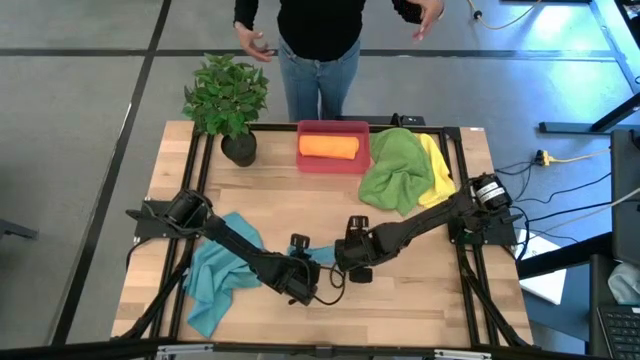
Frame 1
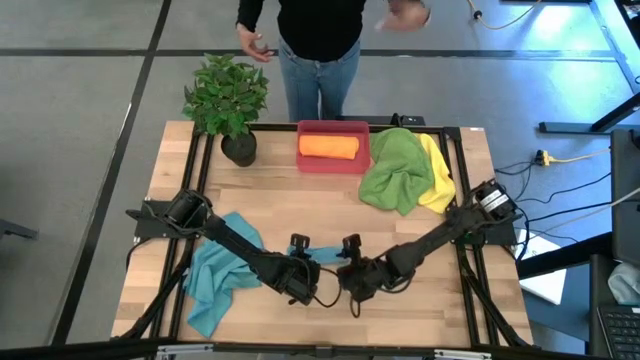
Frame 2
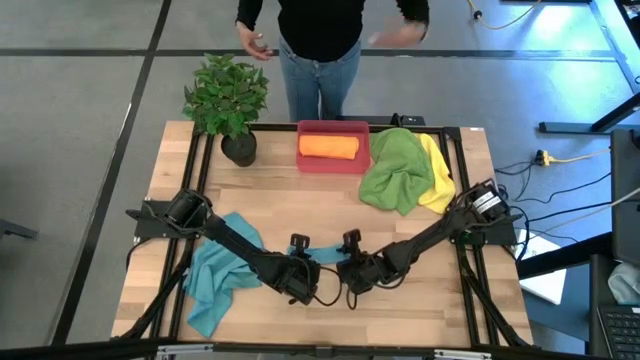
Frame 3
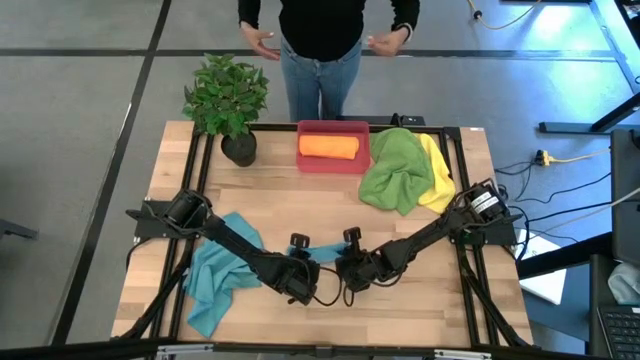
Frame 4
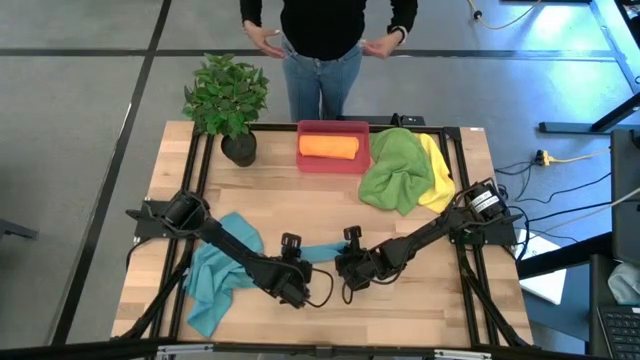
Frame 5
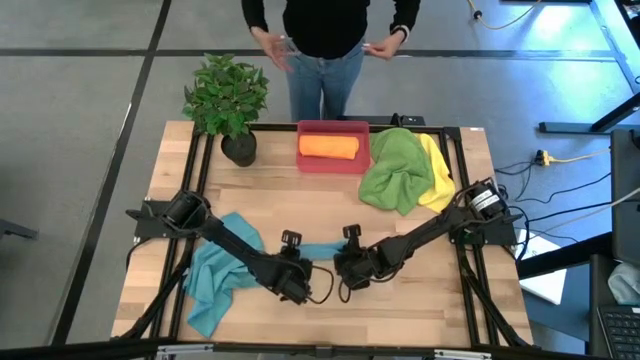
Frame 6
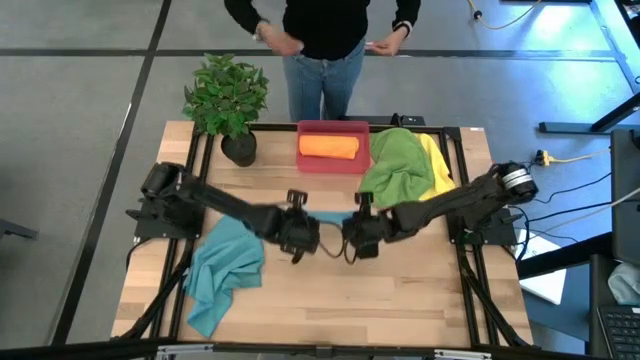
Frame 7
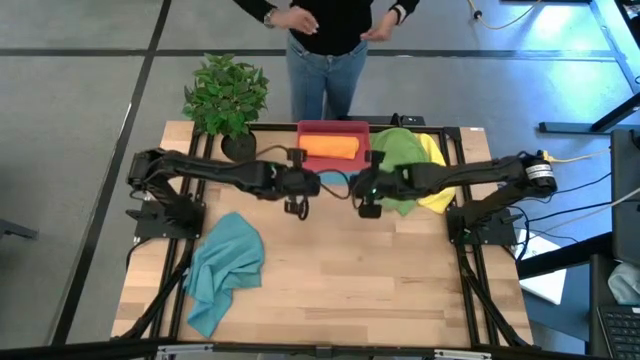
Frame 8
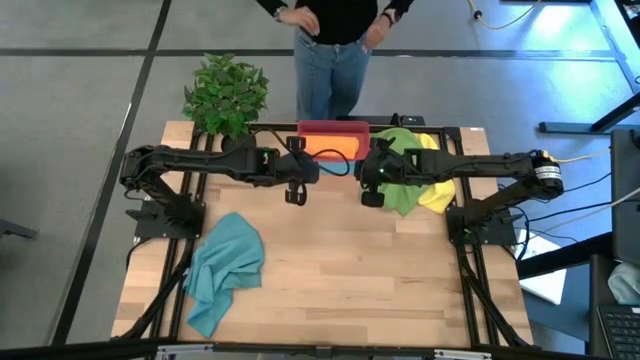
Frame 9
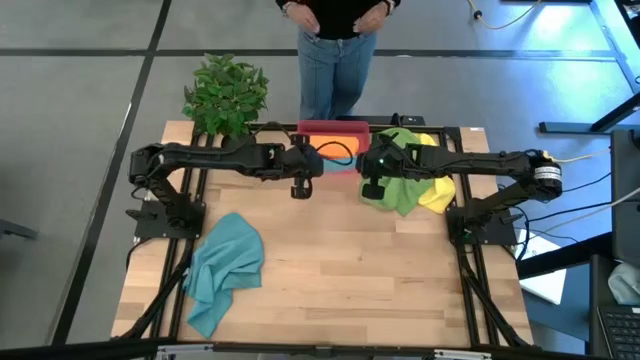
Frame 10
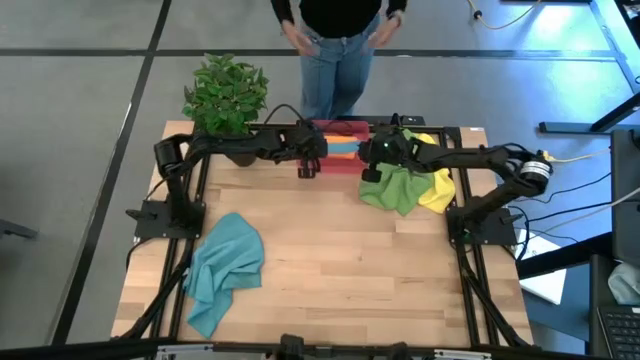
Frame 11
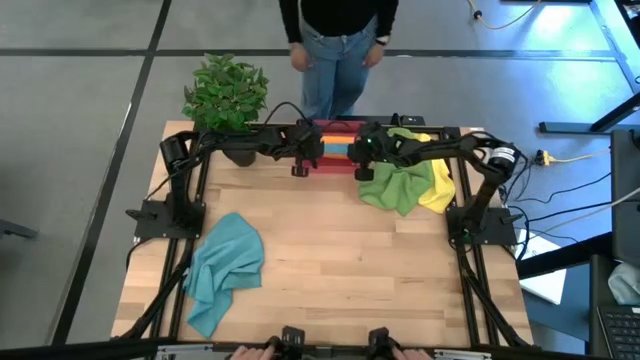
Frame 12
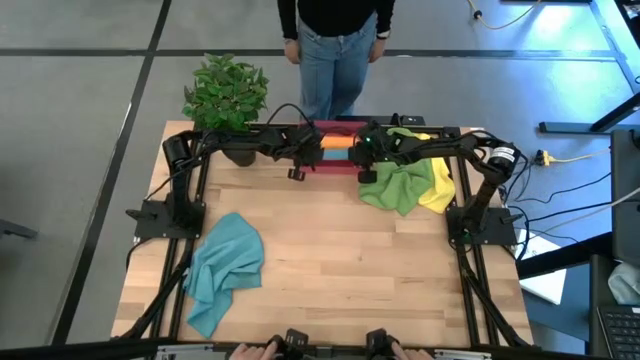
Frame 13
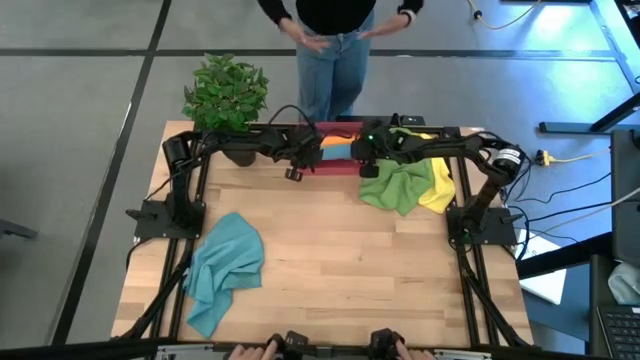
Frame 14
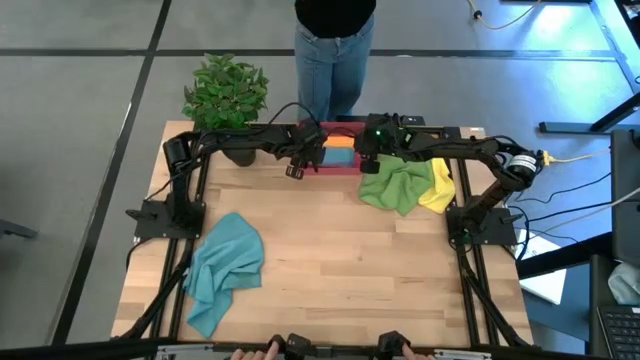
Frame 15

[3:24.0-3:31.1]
Task: Roll microfiber towels into tight, uniform cylinder then place into a basket
Put the right rolled blue towel into the red bin

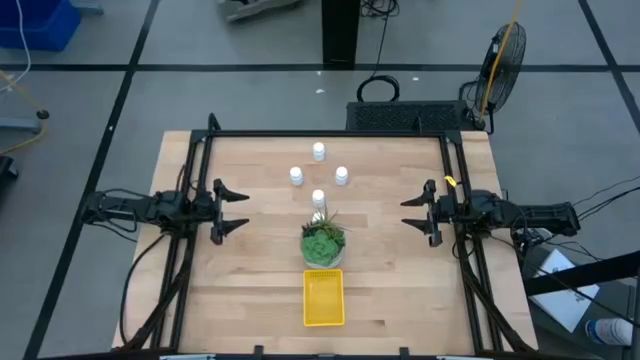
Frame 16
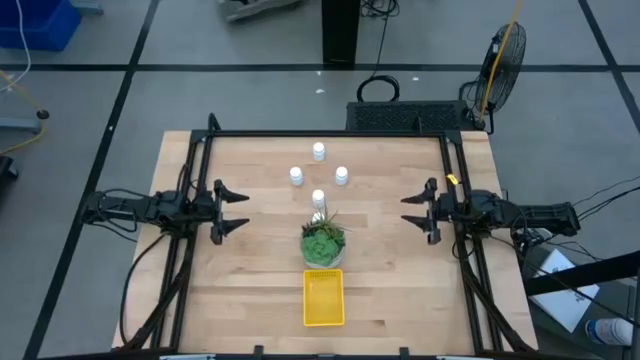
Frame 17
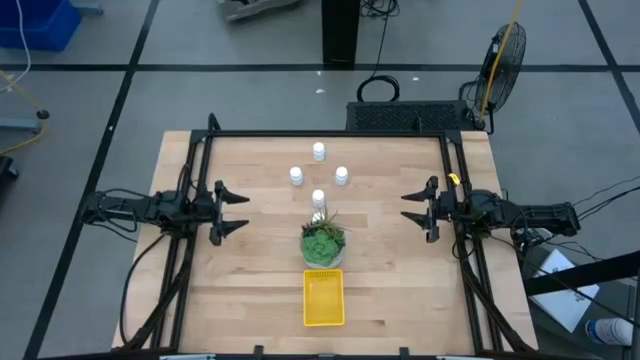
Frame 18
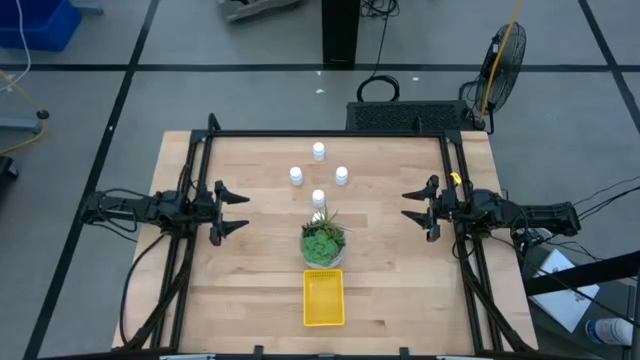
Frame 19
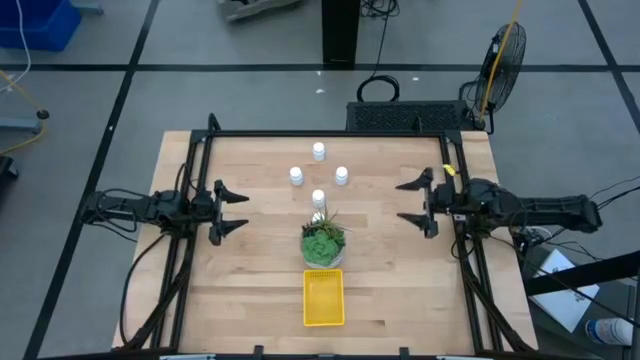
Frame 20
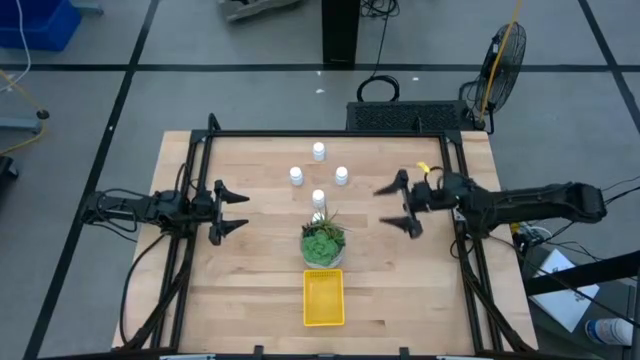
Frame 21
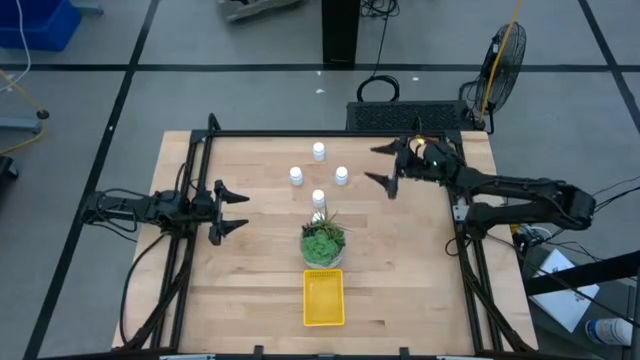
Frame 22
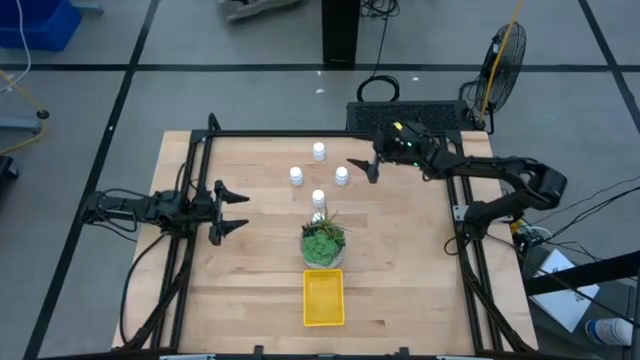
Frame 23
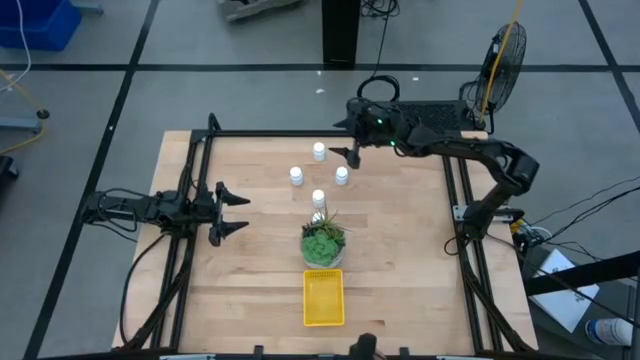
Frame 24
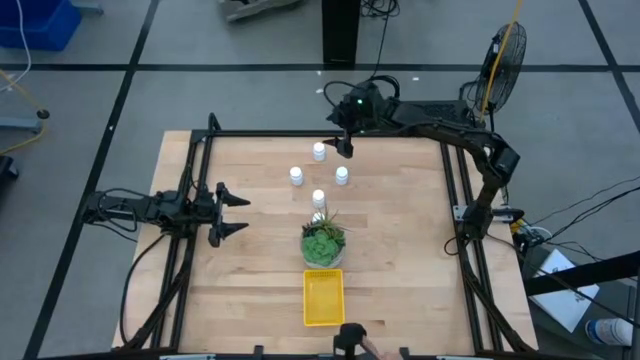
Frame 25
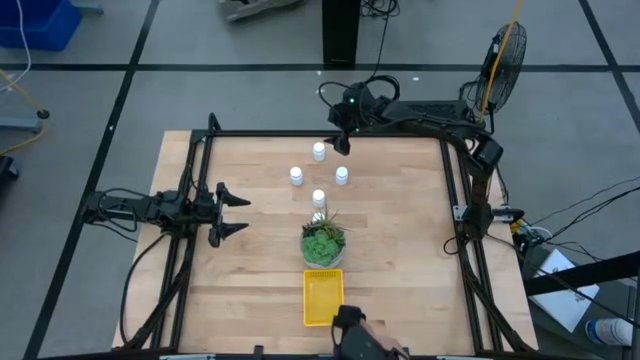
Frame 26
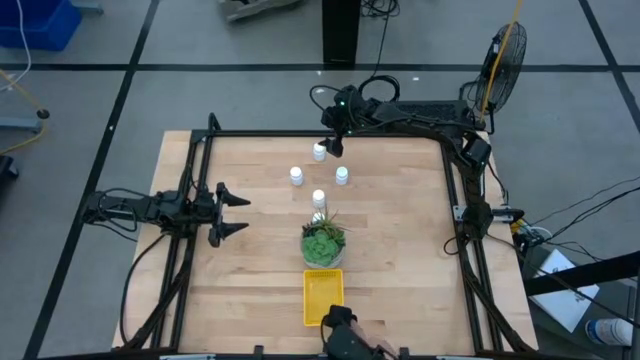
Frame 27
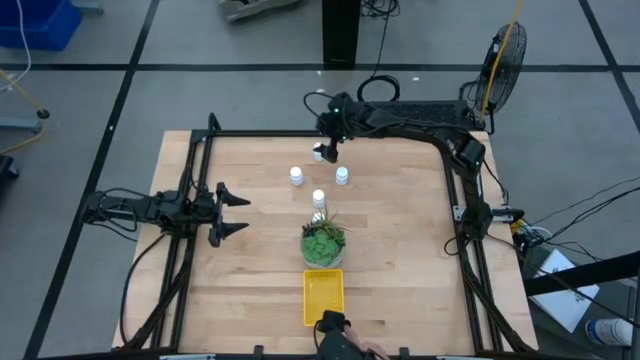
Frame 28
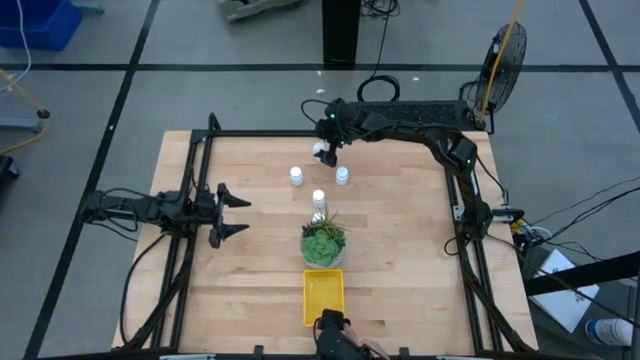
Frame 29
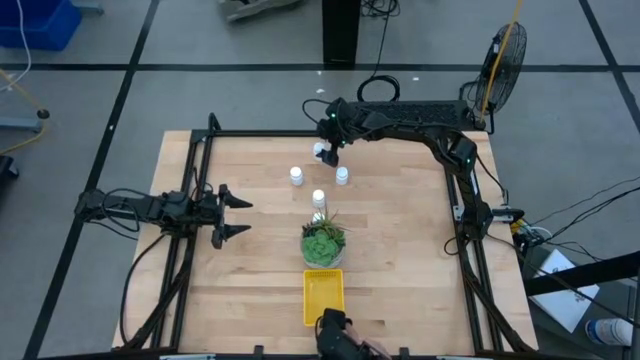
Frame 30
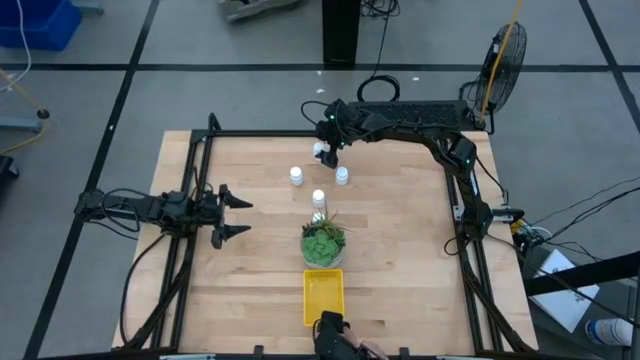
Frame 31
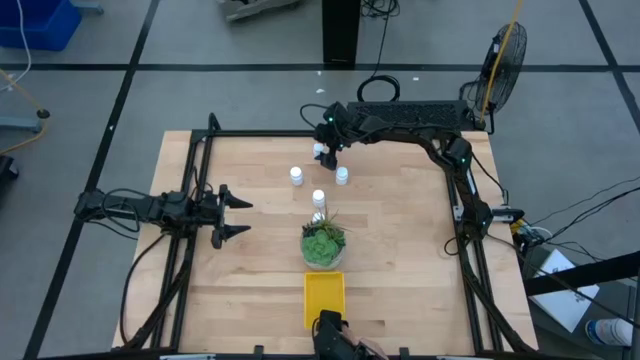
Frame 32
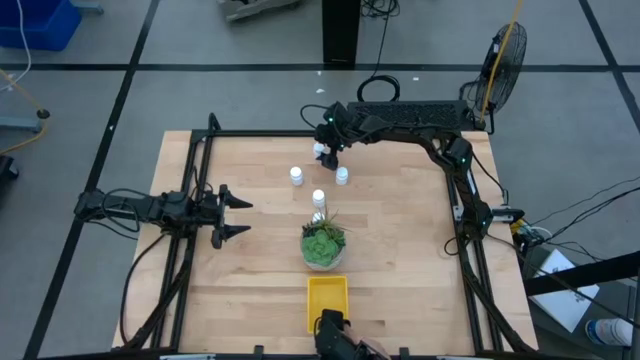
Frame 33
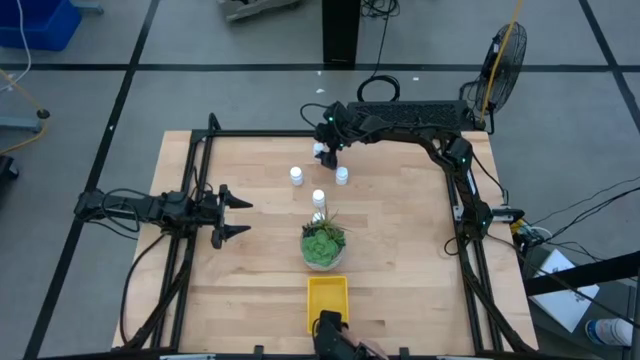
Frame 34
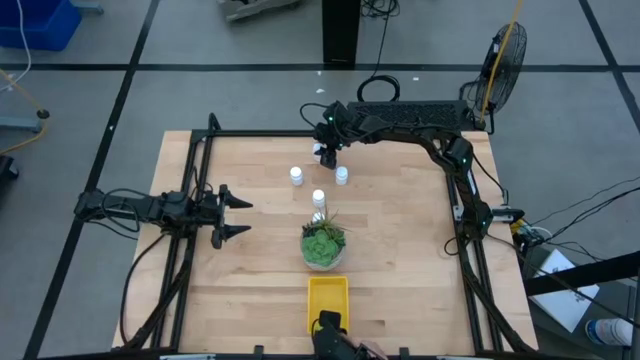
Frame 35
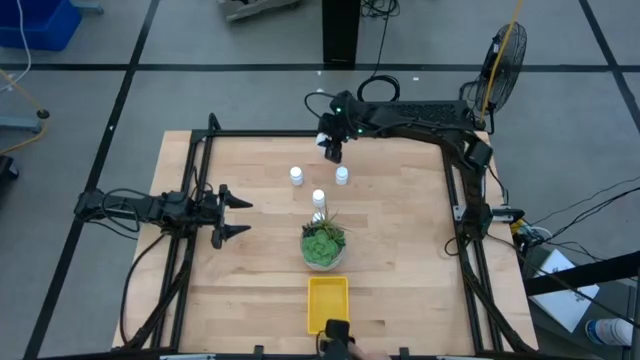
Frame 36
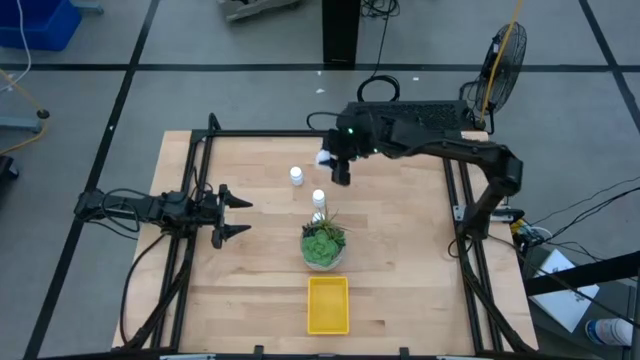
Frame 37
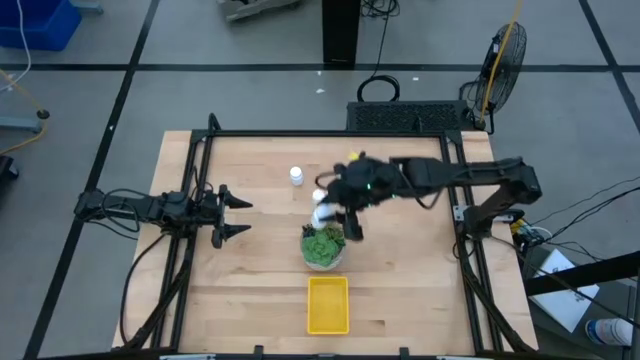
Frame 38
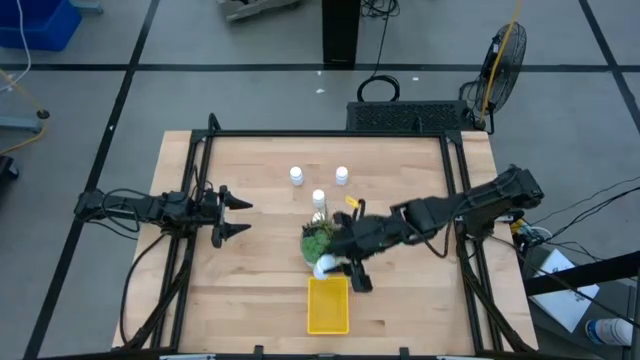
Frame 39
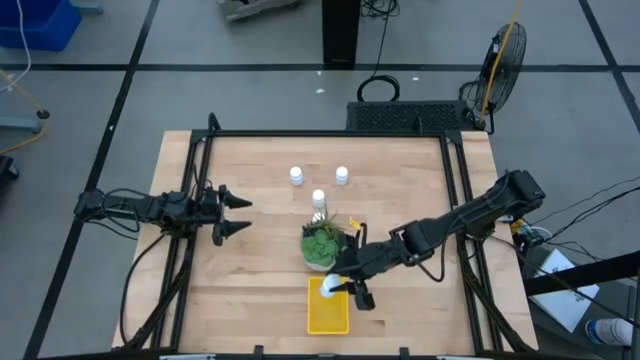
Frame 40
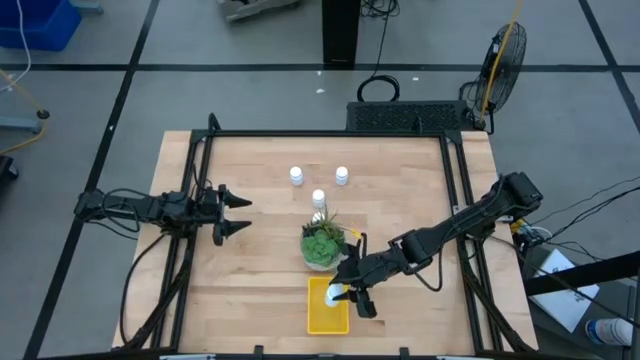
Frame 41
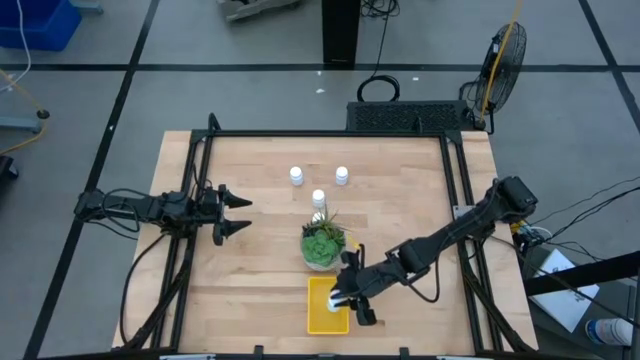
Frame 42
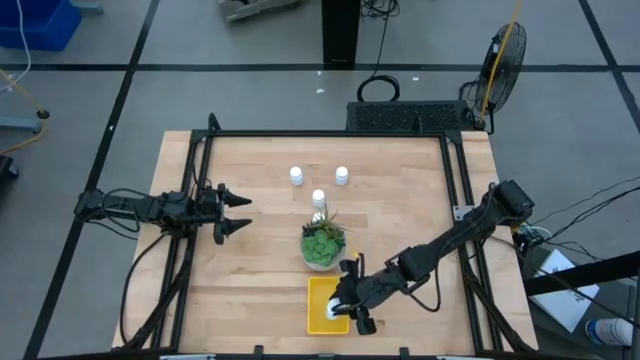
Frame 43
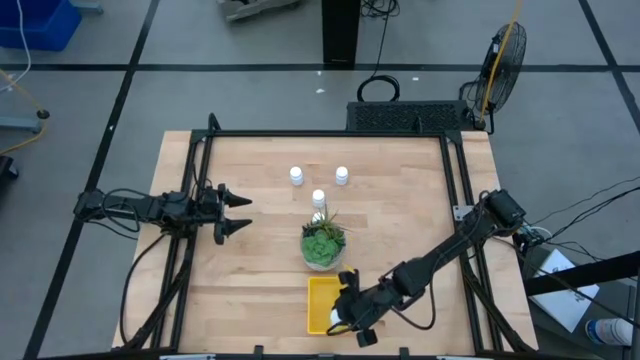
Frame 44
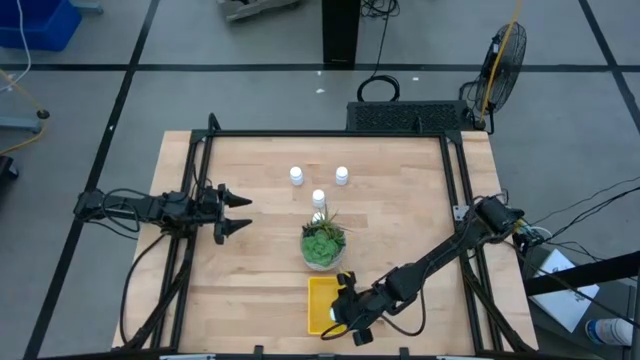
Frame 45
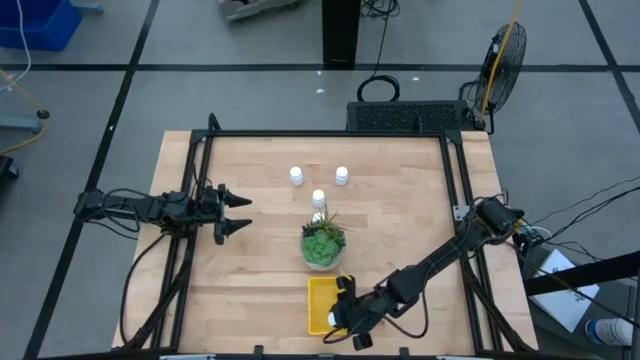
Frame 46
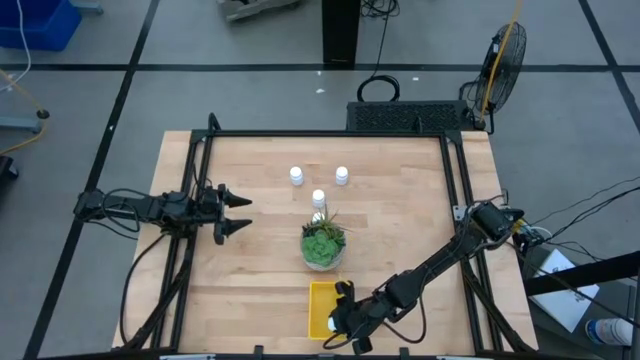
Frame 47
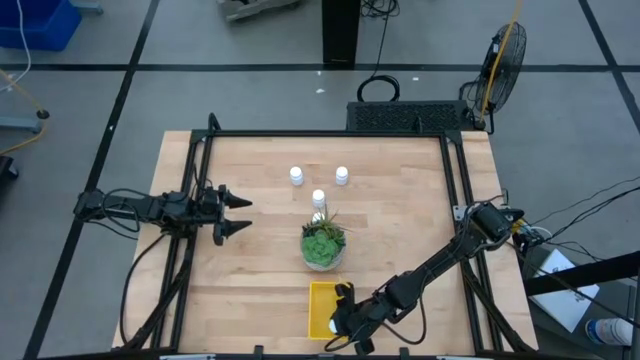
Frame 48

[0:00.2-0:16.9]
Task: Pick and place pill bottles into a basket
Put the white pill bottle into the yellow bin
